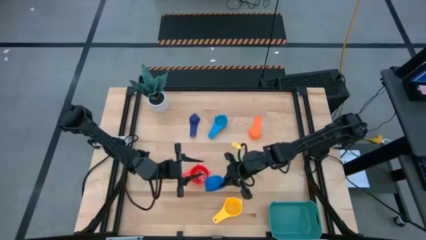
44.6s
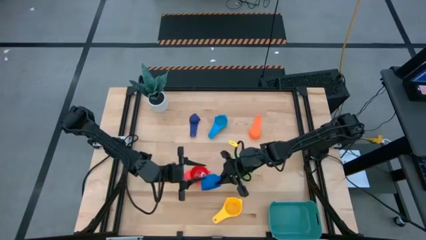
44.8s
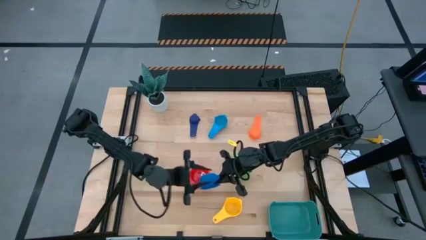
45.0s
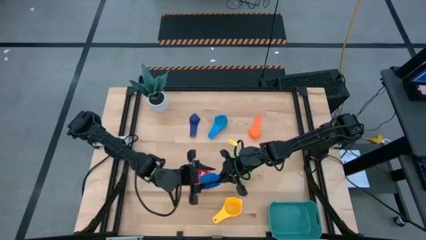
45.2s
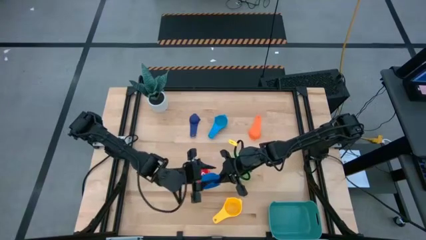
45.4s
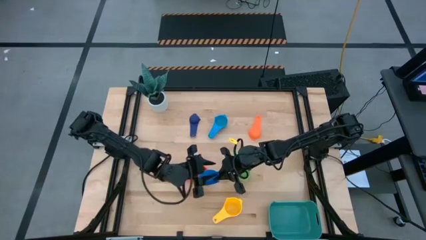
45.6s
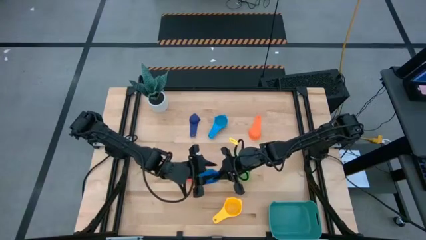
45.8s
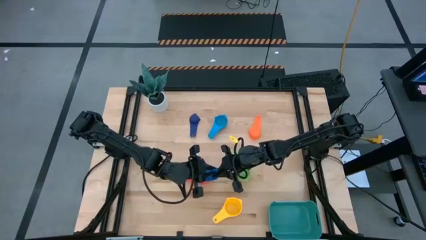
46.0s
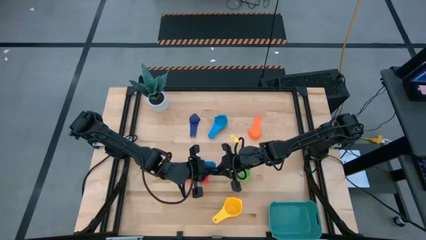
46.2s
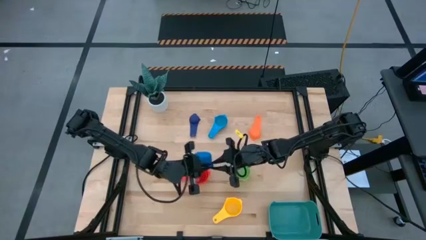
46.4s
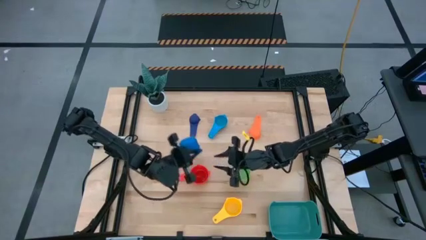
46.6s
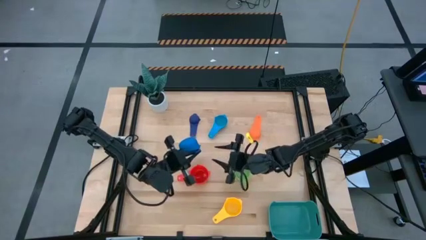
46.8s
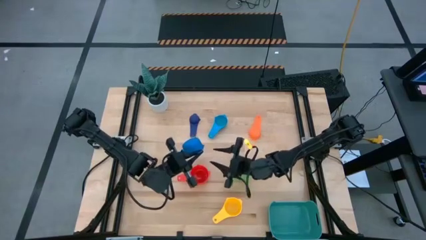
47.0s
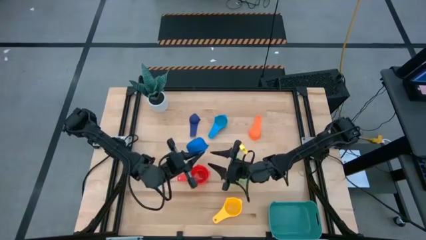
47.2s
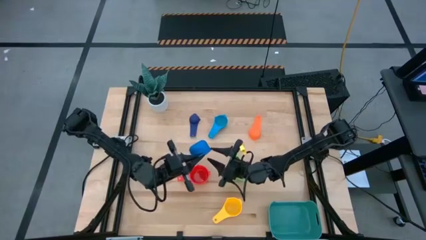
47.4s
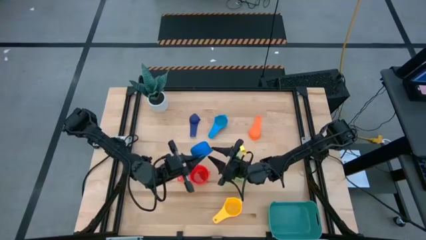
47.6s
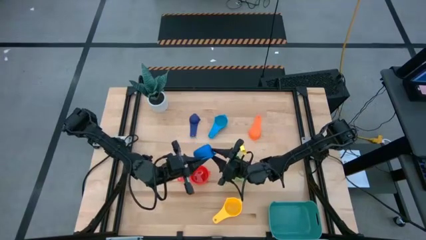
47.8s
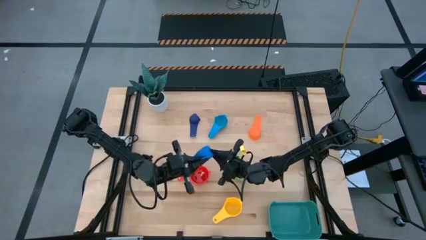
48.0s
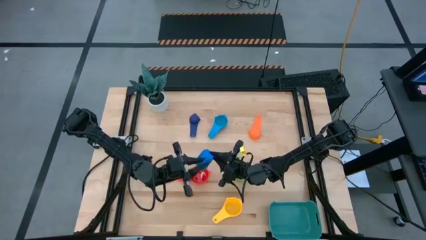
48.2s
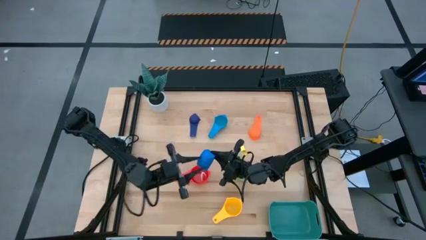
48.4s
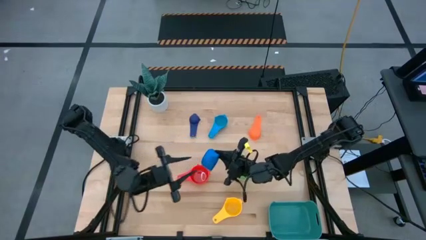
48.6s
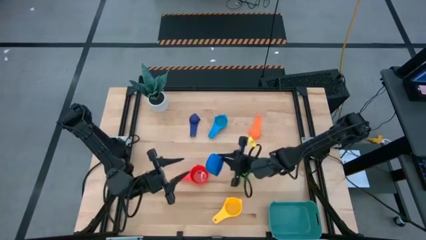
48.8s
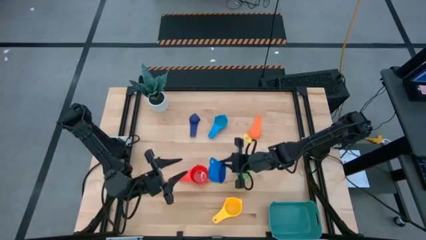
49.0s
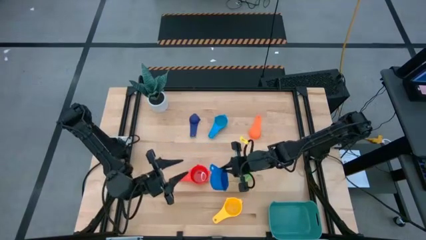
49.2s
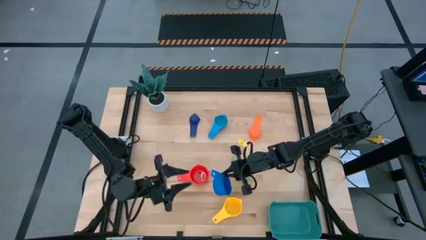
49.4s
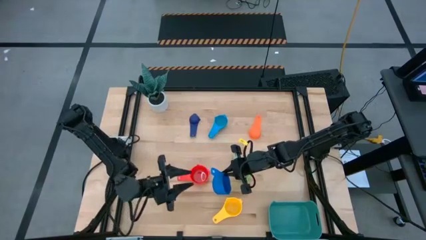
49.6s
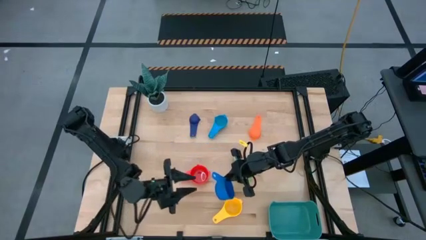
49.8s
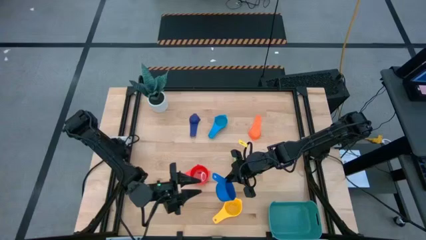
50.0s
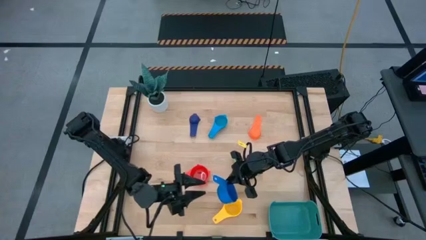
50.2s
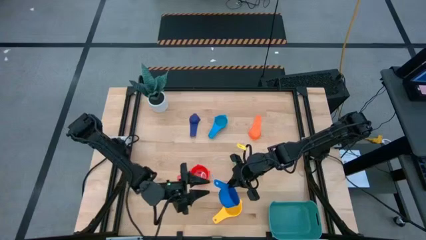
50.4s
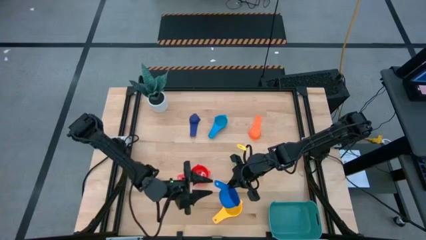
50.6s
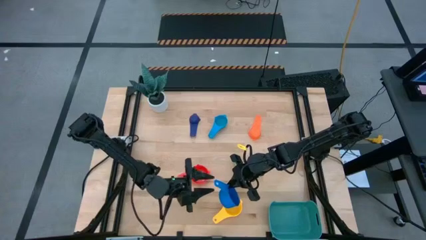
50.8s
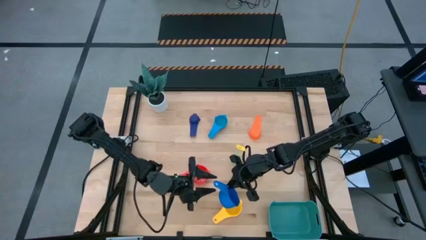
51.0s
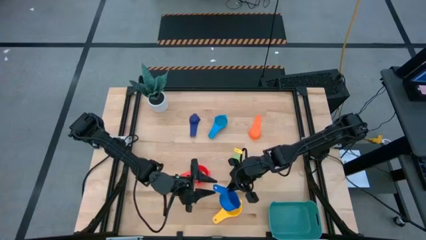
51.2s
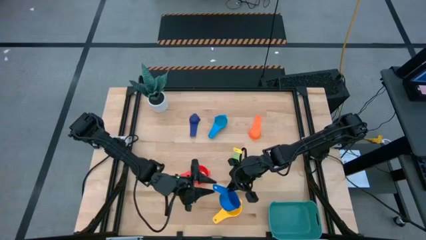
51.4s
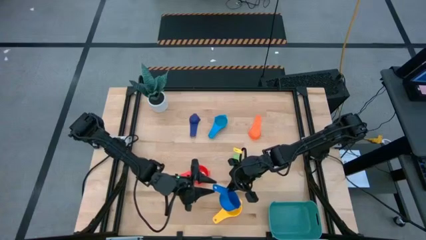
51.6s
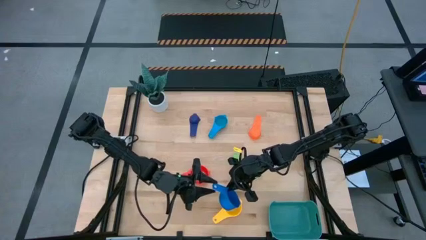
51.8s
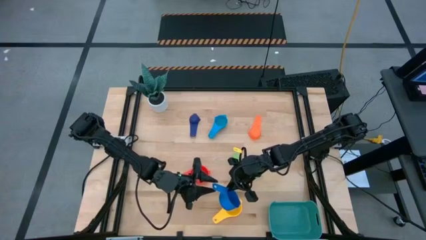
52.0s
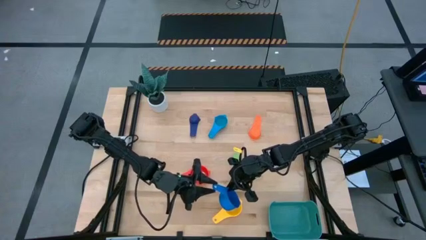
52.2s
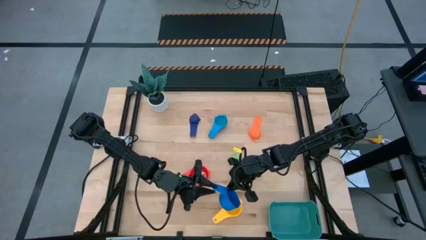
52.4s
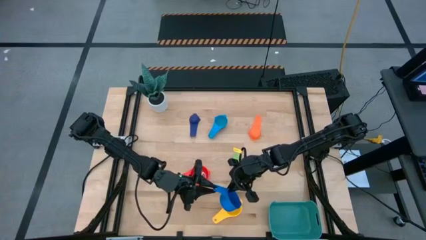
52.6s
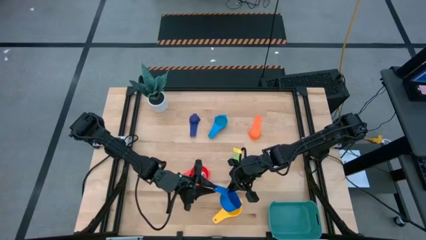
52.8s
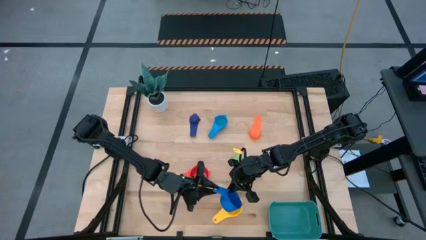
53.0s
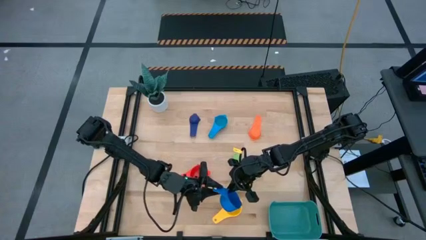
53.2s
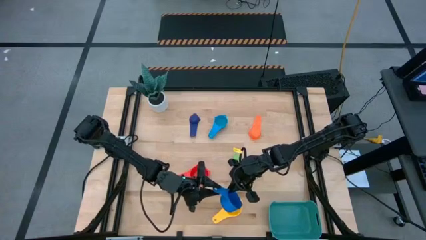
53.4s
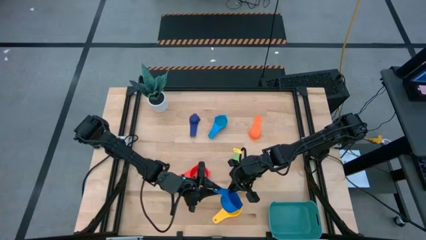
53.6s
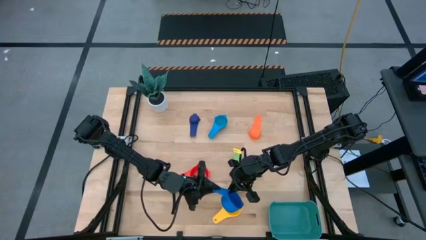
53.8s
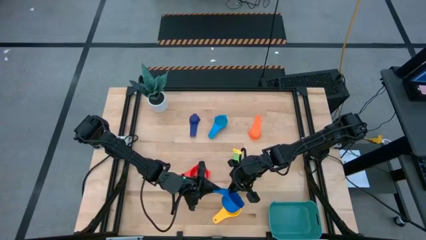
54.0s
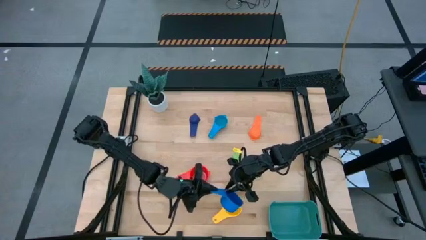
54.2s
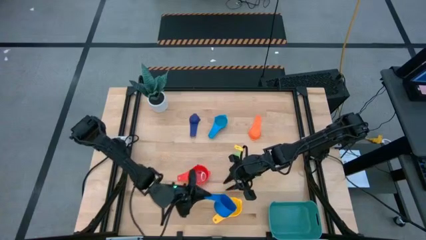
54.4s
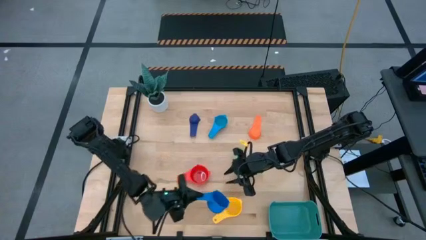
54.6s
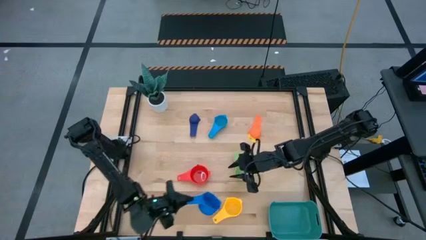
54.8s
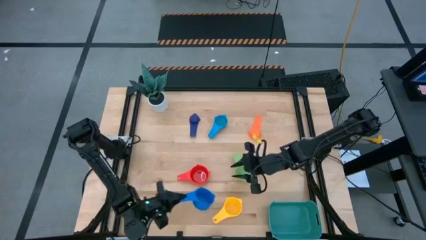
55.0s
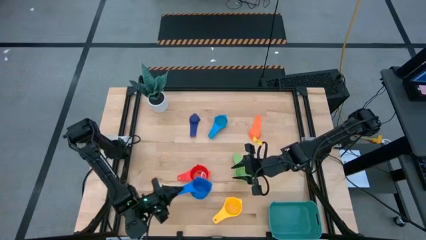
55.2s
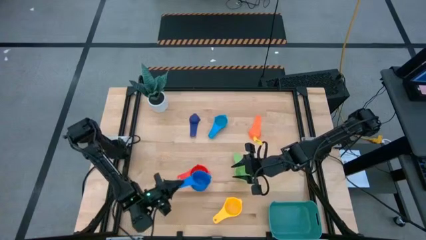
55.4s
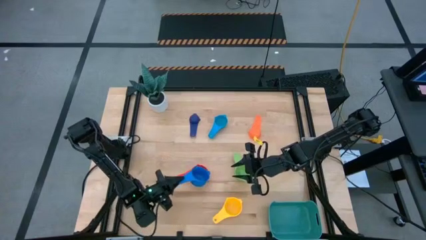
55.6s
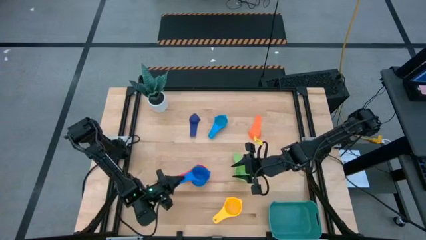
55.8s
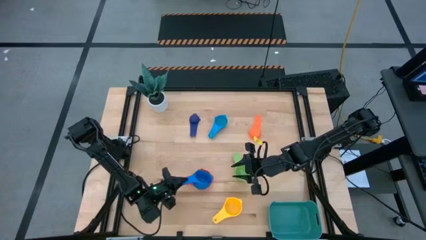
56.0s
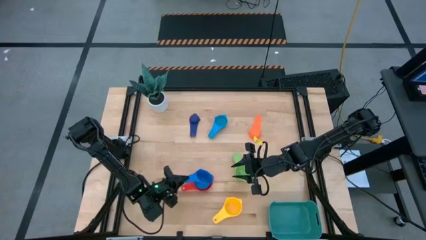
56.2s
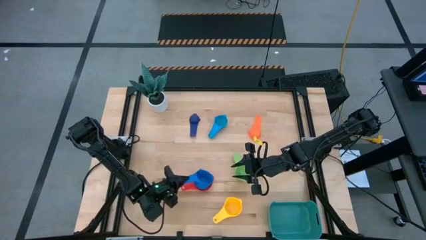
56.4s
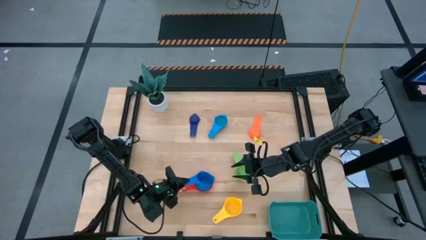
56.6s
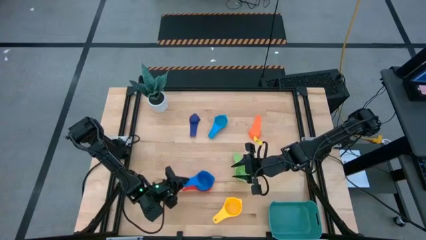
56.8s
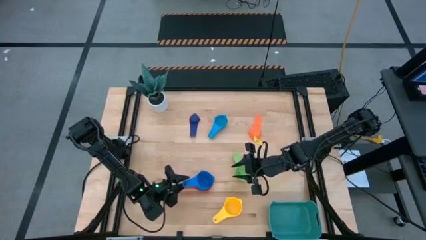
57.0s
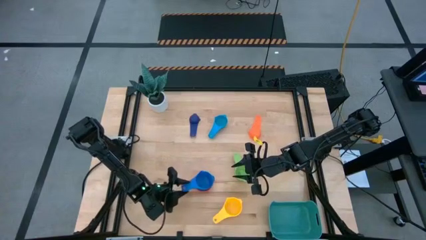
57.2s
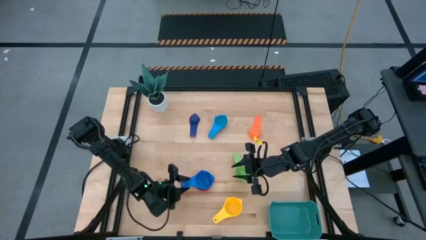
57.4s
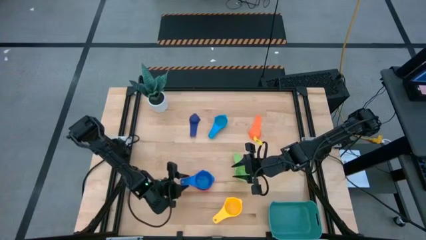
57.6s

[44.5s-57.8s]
Task: Nest measuring cups in basket
Stack the blue measuring cup on top of the red measuring cup

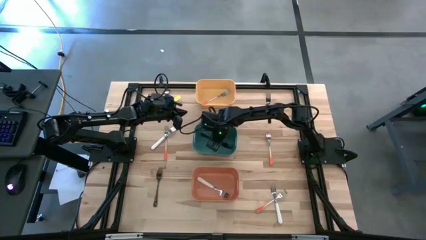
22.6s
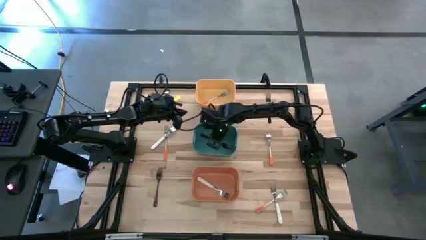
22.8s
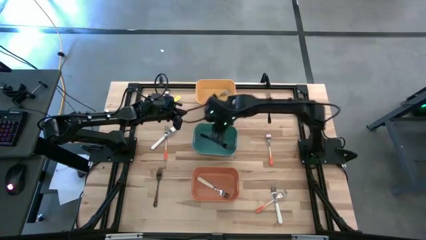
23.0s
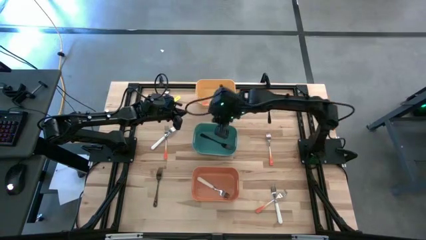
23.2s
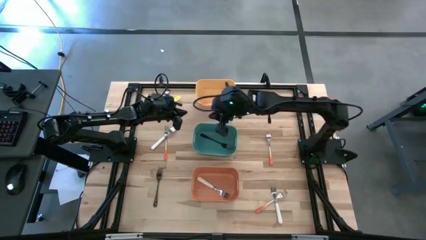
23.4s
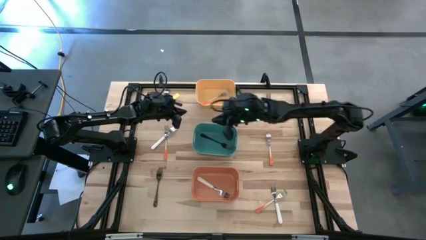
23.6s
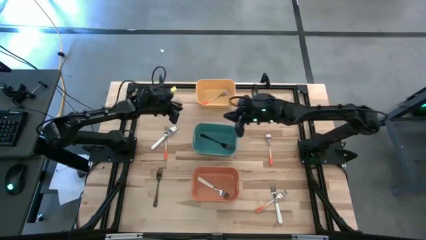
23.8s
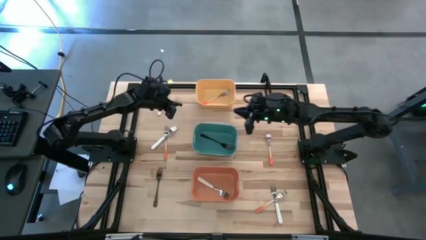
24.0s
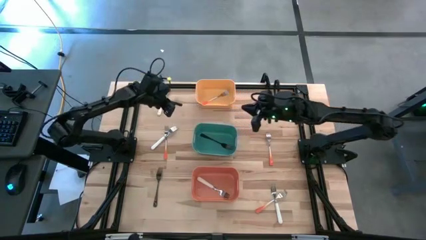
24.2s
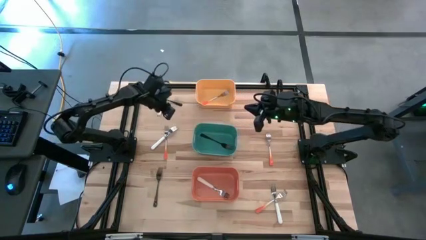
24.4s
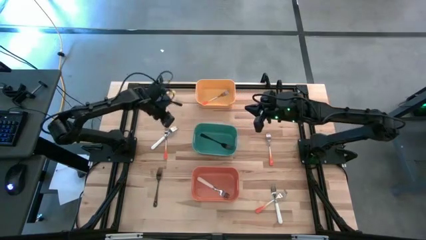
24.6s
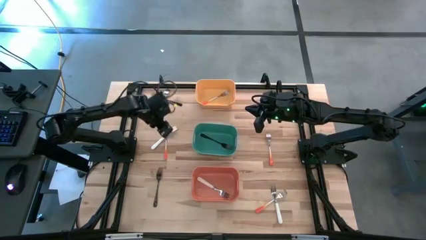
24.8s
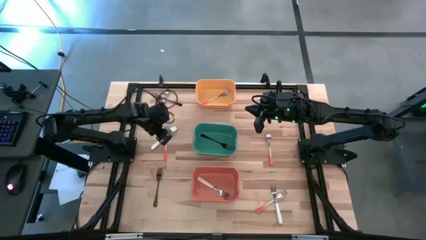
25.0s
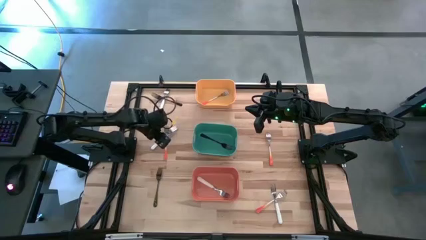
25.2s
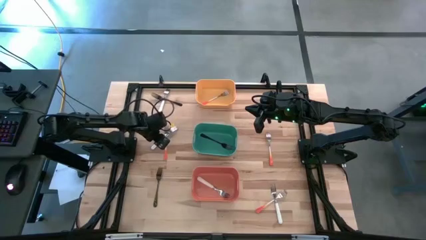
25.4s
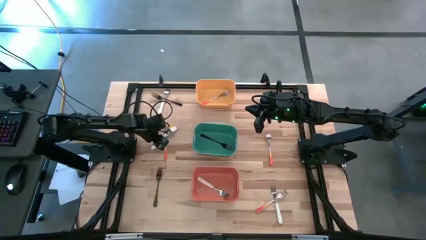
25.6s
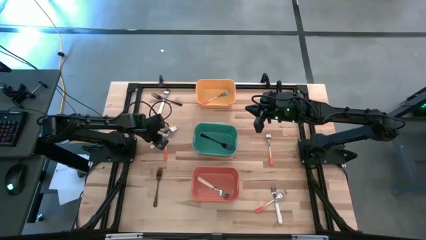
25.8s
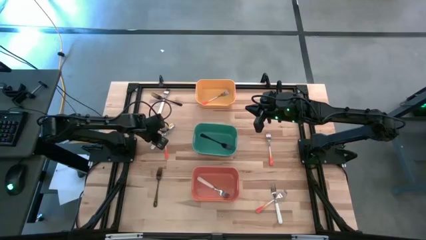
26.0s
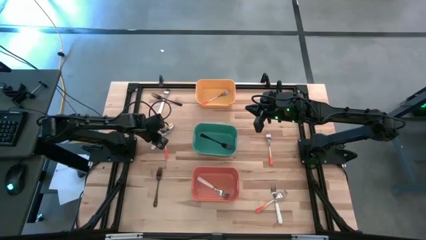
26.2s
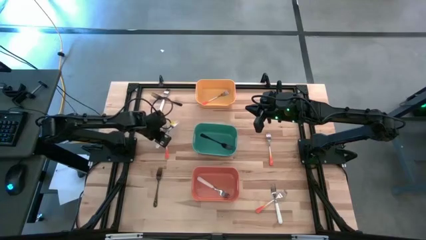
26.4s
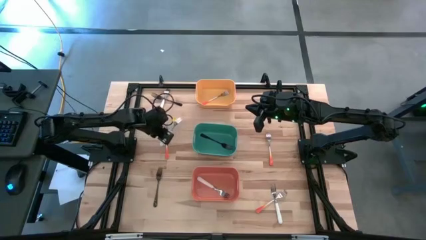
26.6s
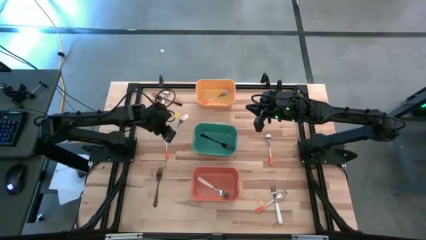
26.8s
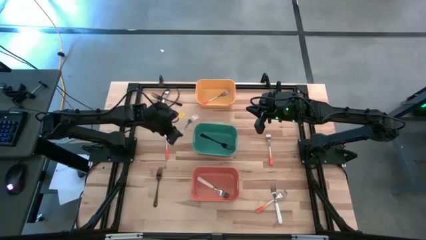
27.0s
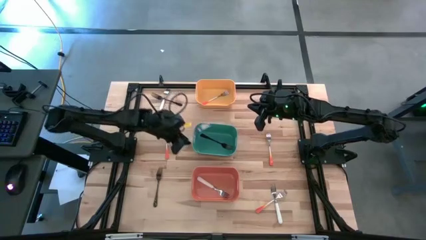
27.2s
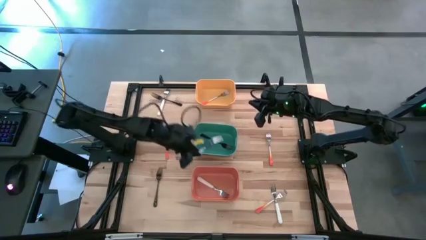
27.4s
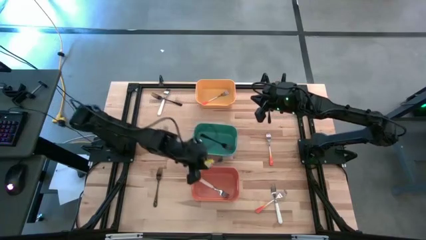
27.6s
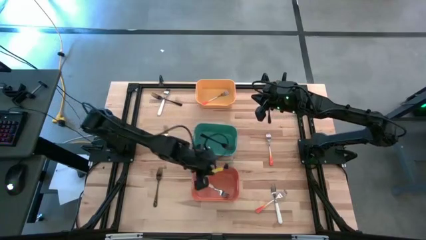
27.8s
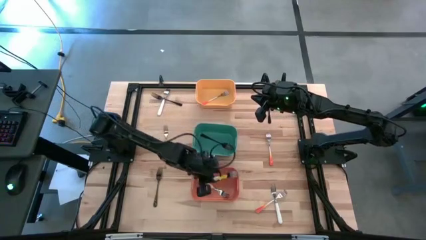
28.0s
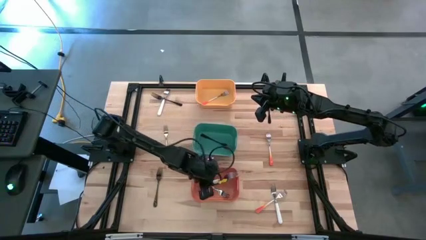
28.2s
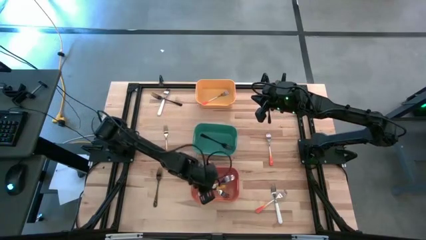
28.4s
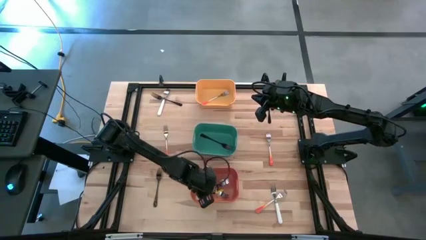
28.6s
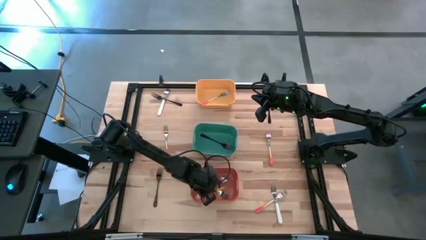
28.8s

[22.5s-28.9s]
Task: Sort silverware by color (type)
Put the white fork into the orange bin
